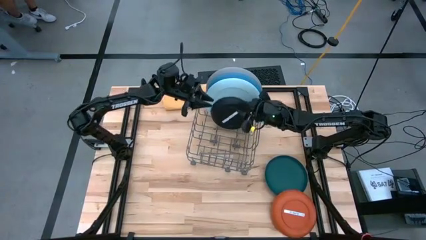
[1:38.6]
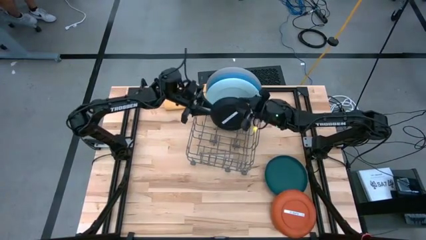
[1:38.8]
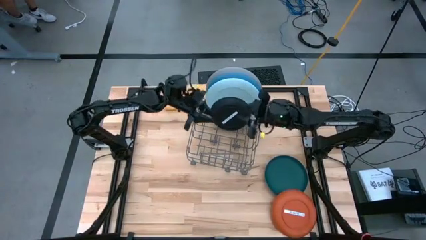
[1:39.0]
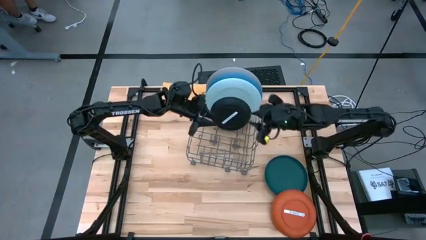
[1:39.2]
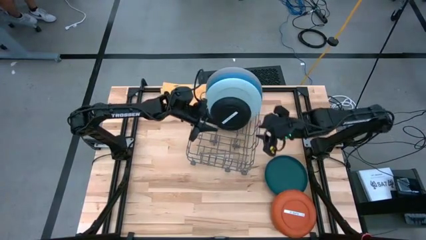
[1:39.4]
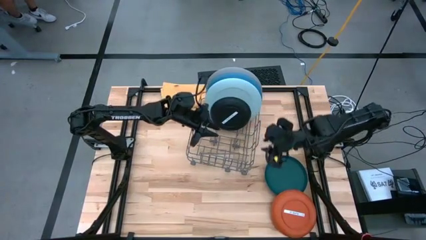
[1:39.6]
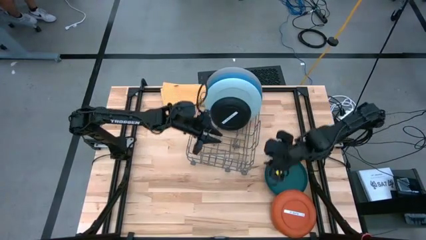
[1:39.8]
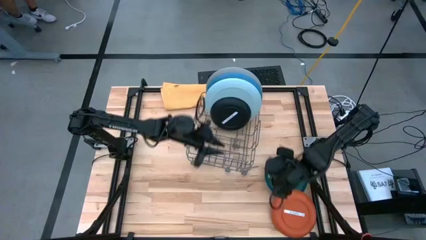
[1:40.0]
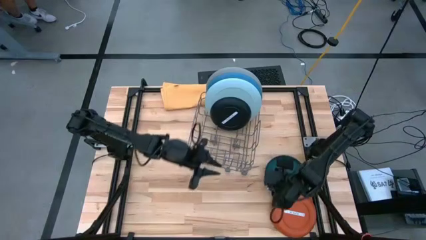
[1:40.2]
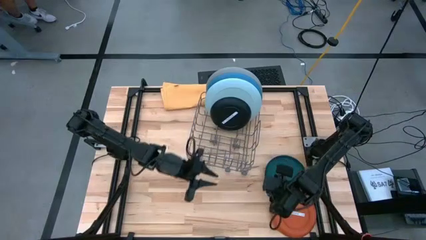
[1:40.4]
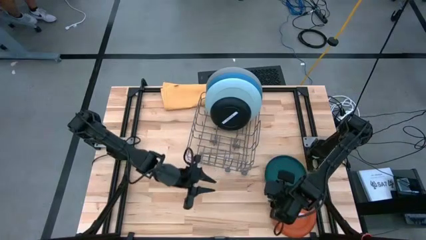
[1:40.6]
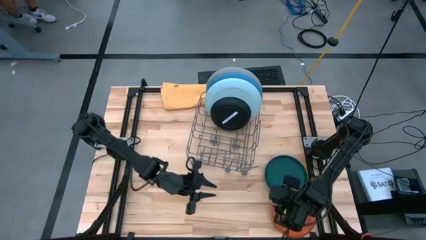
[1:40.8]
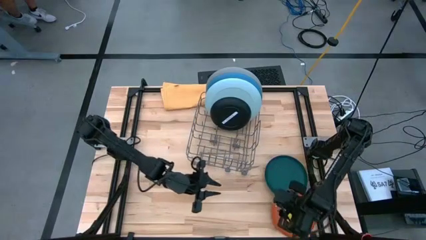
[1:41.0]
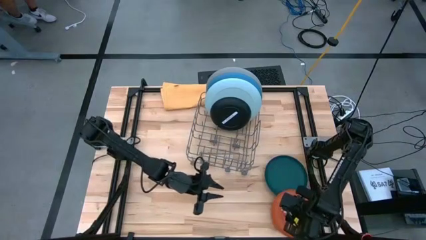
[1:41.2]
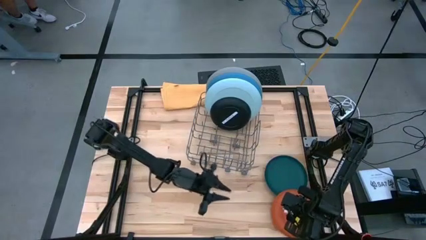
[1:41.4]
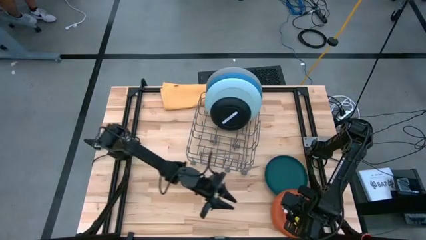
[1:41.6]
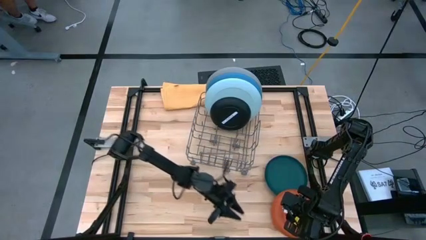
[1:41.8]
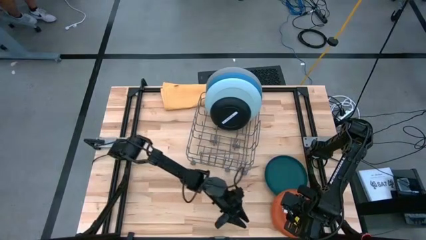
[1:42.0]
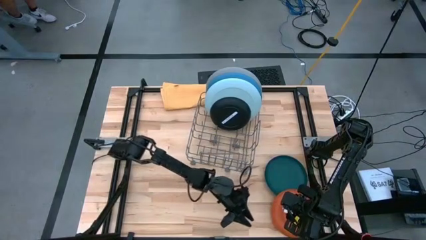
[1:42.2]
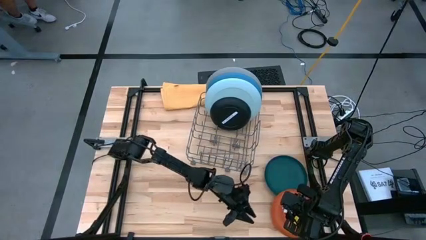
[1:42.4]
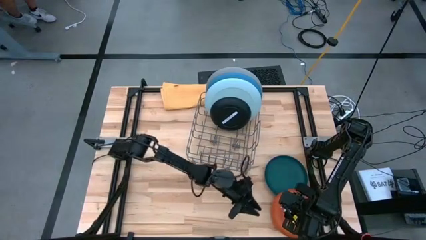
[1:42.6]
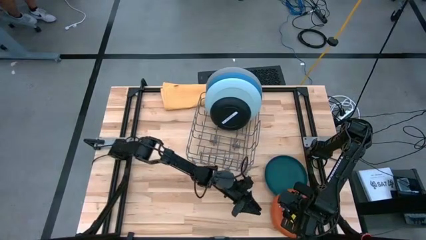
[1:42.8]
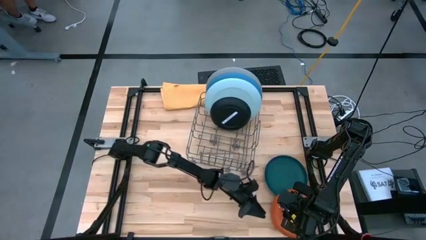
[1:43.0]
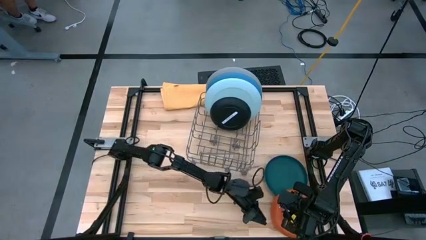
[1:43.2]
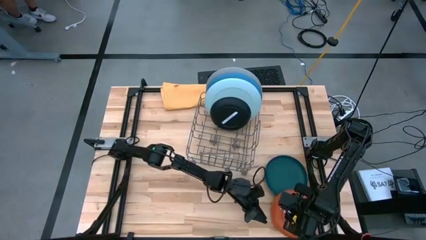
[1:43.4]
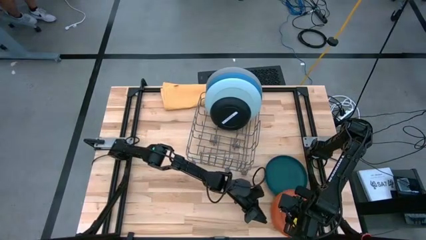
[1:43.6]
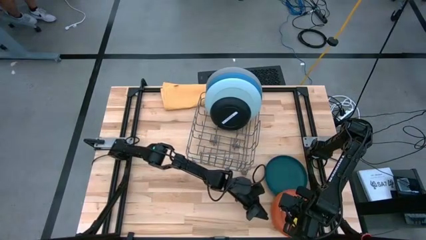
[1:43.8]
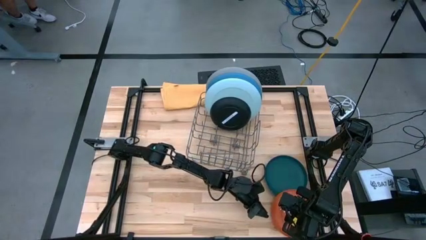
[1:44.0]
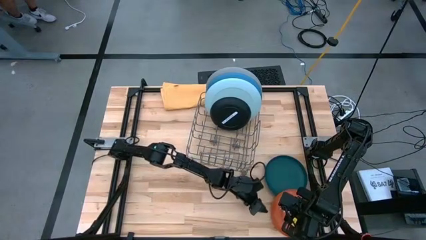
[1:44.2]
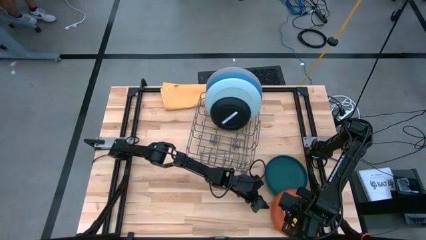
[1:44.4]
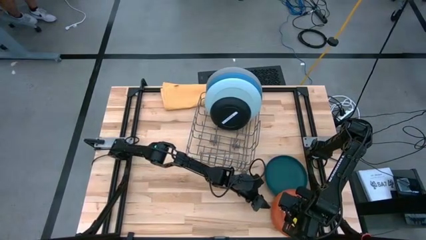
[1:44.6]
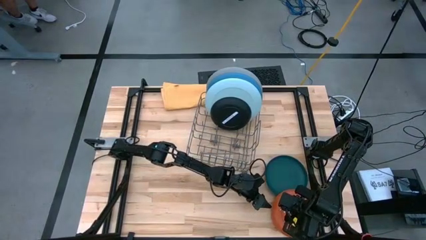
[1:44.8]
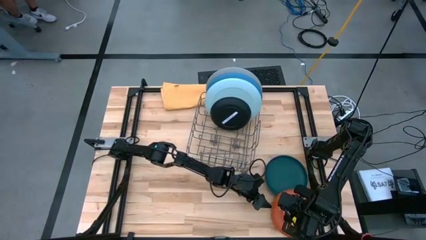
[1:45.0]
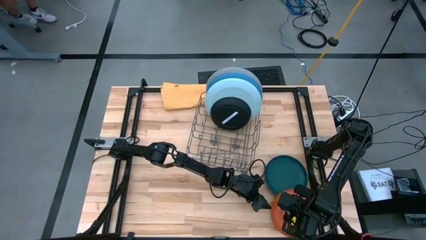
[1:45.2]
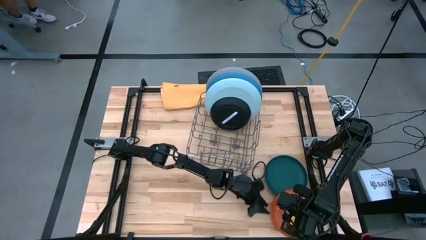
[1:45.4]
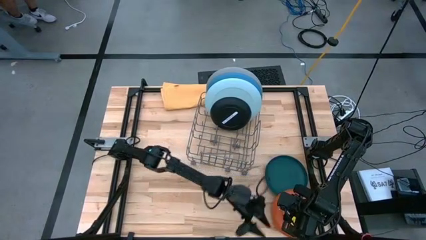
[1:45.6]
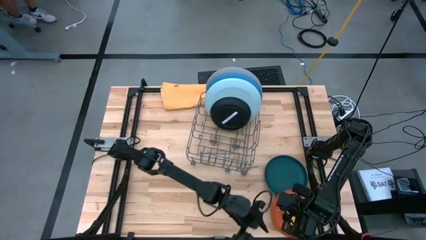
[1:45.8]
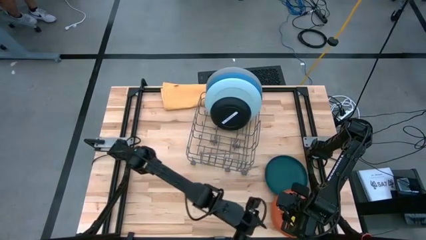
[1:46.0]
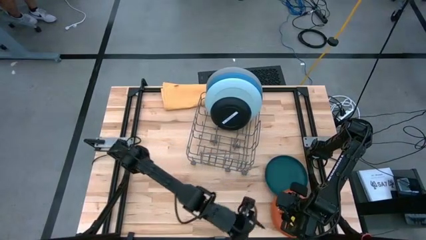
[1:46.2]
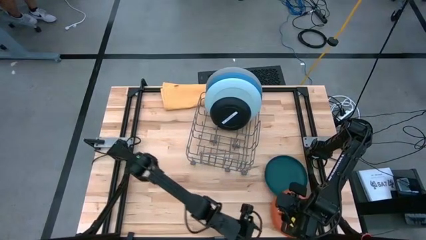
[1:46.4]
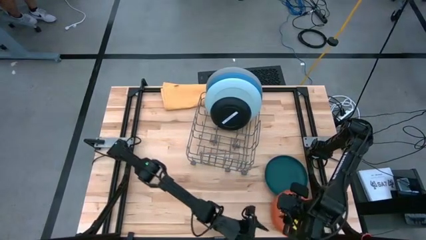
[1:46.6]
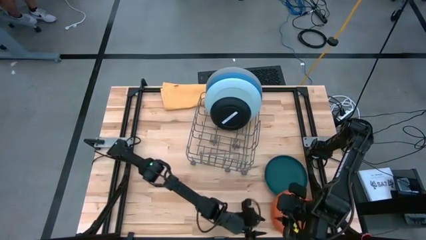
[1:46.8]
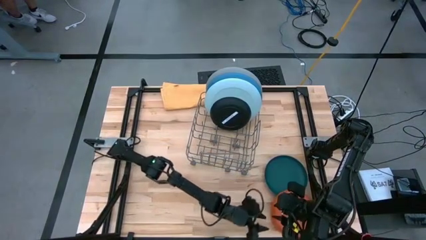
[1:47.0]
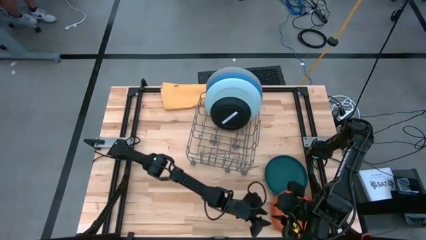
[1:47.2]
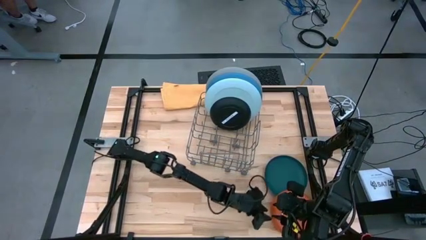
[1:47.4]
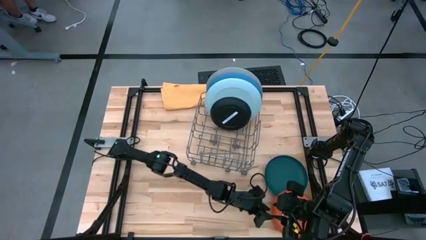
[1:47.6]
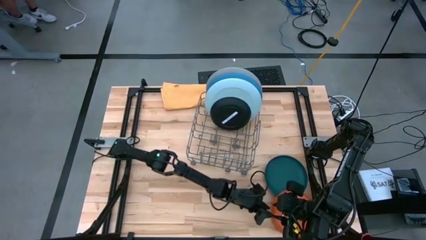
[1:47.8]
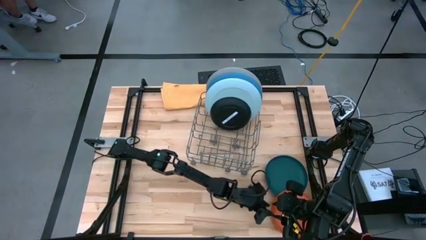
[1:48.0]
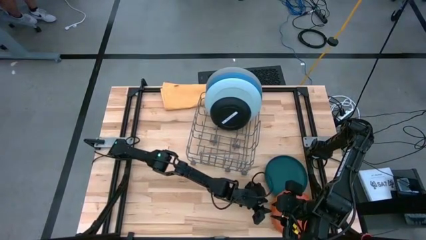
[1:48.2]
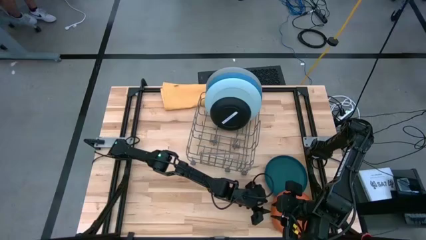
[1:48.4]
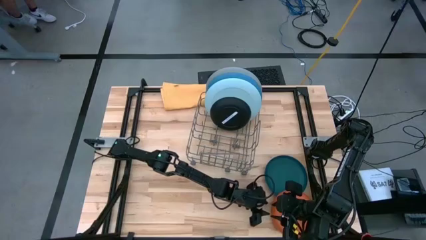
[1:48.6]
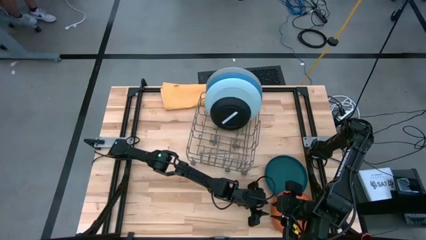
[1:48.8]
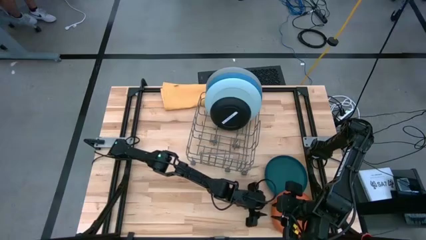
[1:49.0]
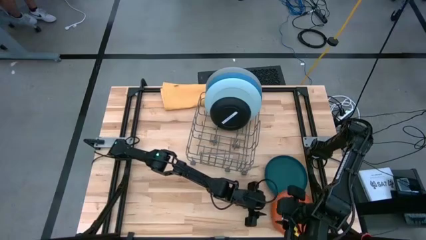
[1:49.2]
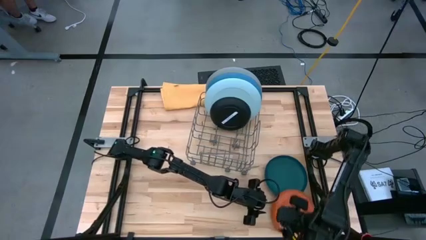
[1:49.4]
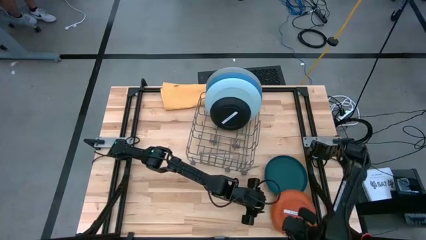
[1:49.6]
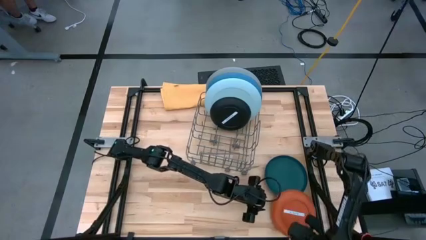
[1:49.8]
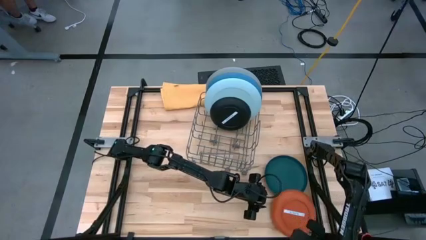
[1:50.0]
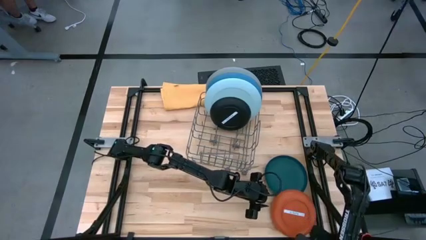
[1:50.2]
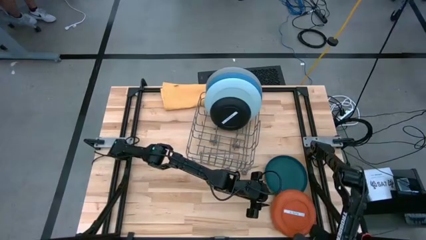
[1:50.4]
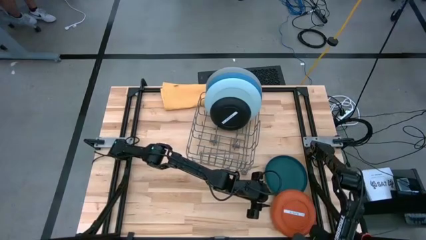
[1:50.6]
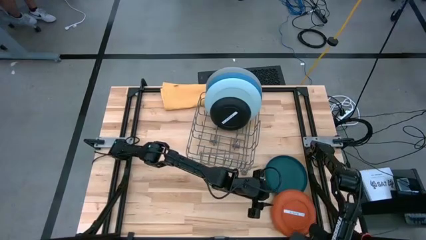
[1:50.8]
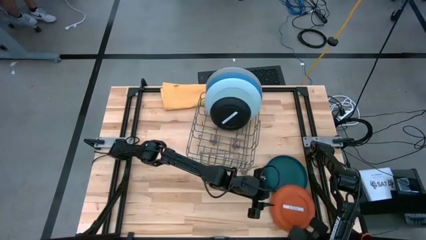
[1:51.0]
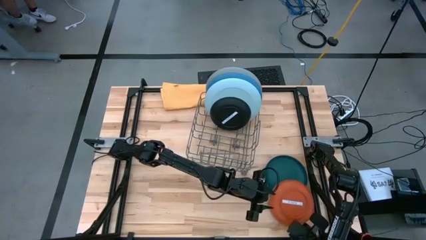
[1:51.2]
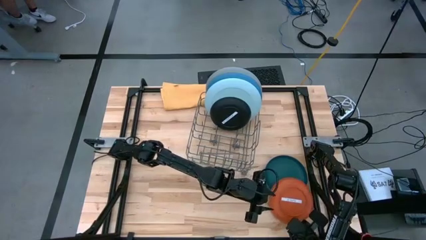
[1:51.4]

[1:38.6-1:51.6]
Task: Sort dishes
Put the orange plate into the dish rack

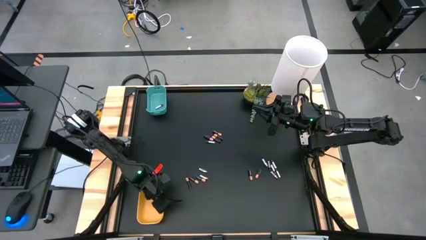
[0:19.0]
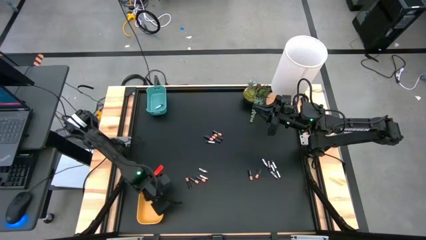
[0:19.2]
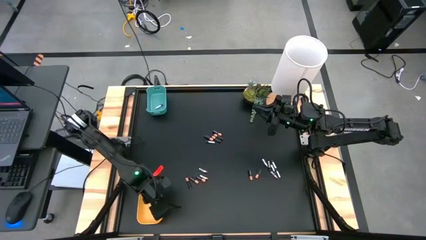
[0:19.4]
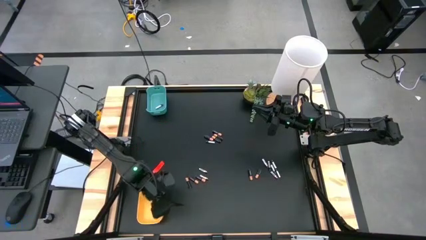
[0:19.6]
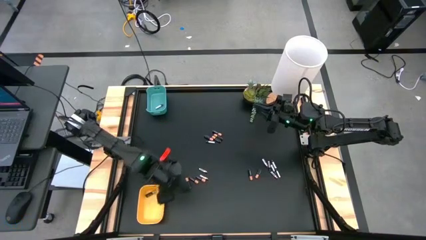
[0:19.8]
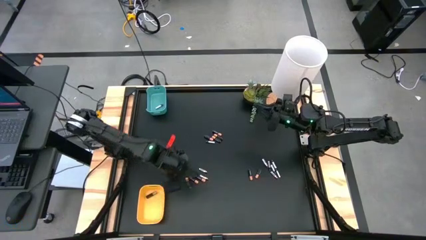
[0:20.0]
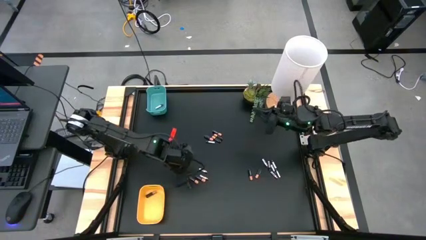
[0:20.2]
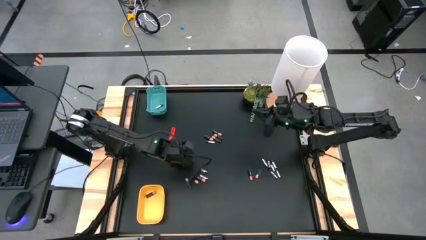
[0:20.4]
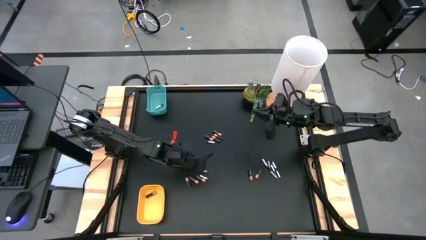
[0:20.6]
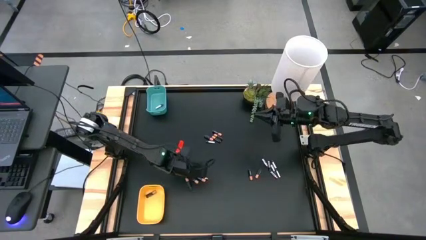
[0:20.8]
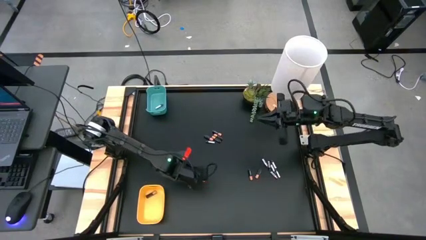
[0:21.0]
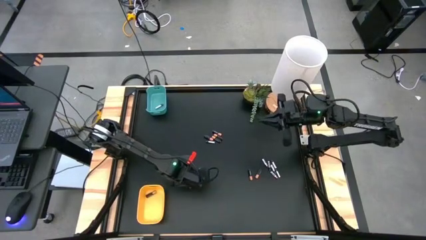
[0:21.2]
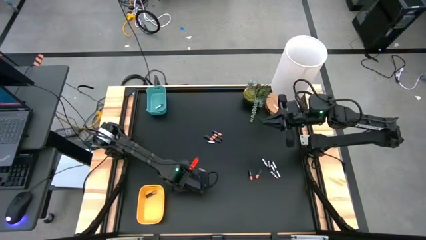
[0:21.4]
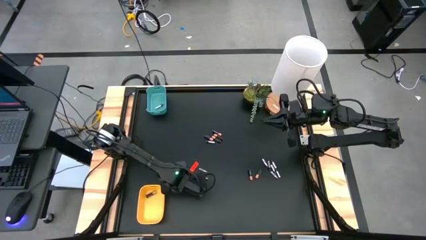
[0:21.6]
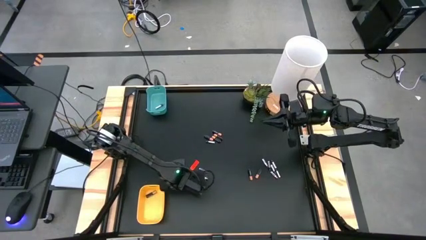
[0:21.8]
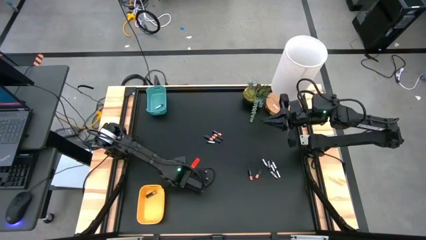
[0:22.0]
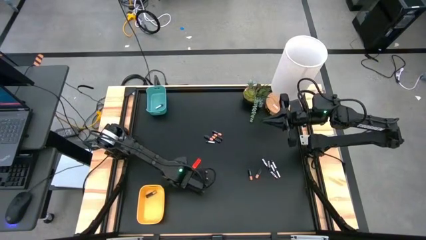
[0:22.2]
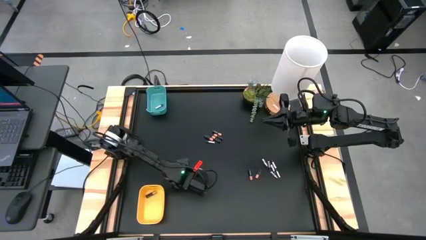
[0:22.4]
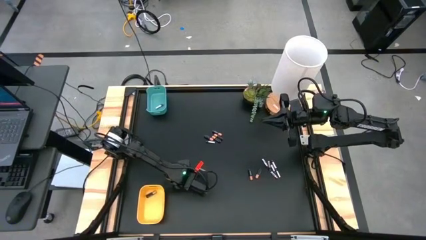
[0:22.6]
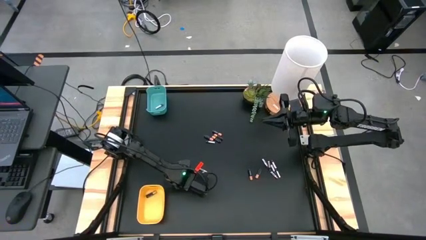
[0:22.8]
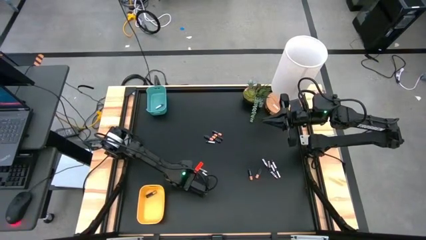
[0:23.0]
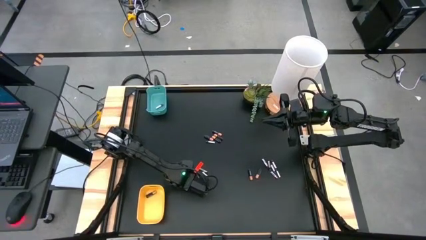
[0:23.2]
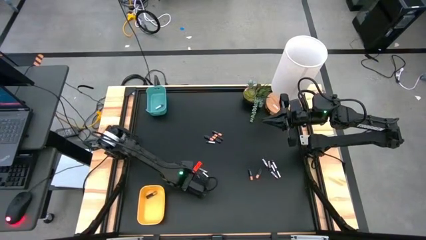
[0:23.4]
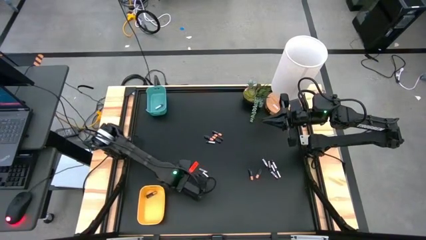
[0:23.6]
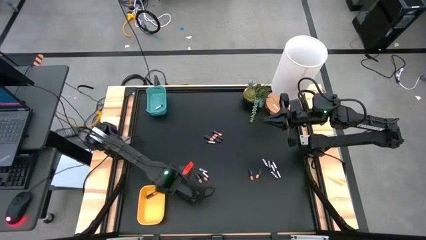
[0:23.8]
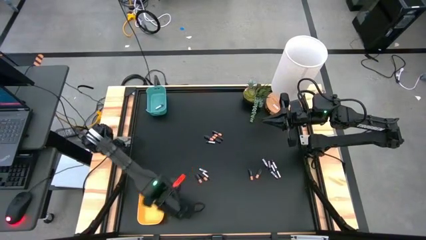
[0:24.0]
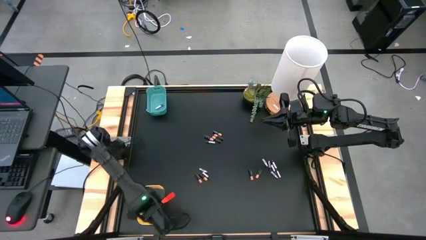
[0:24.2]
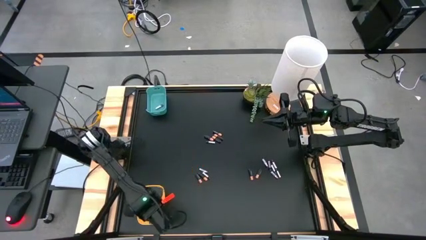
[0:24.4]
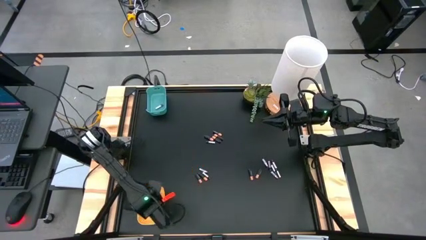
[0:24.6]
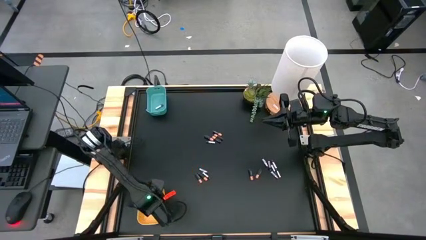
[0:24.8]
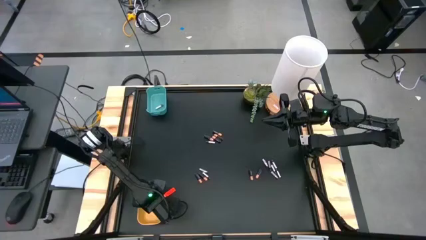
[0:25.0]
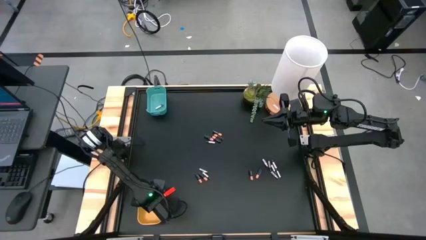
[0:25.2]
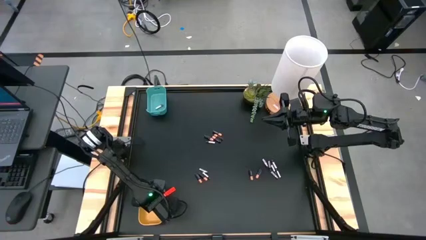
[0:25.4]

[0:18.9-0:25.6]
Task: Sort batteries
Put the black battery into the yellow bin
